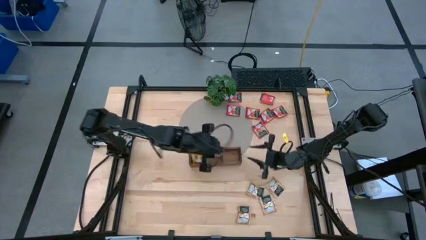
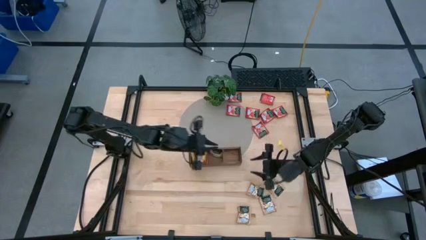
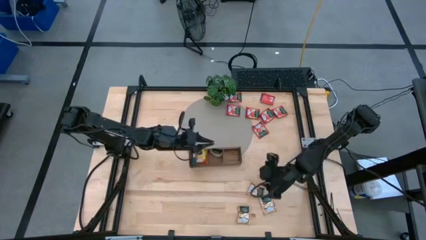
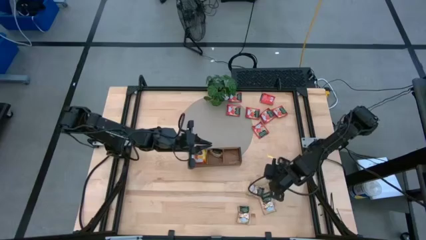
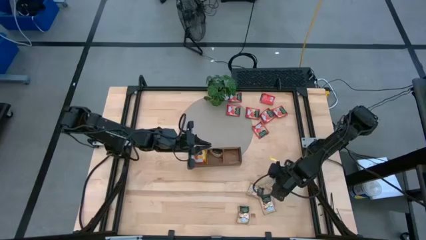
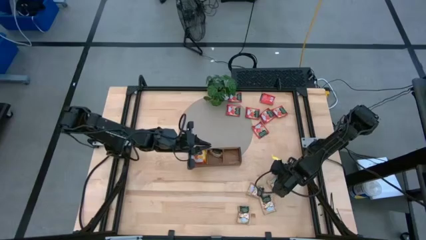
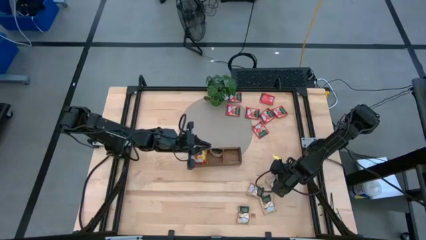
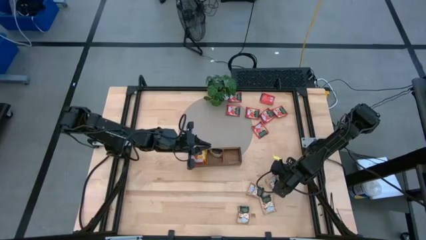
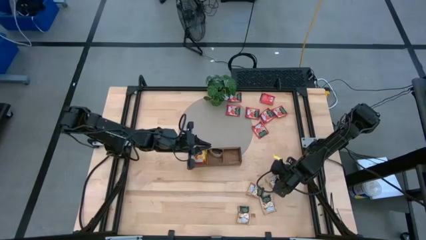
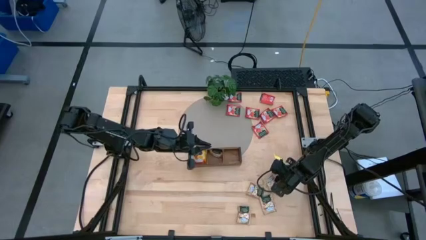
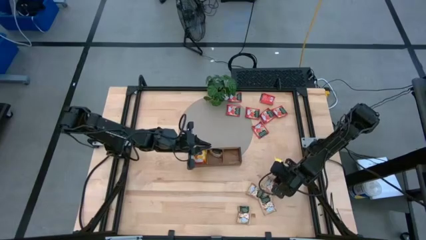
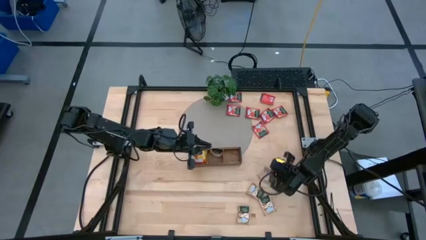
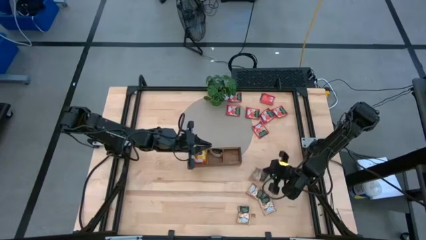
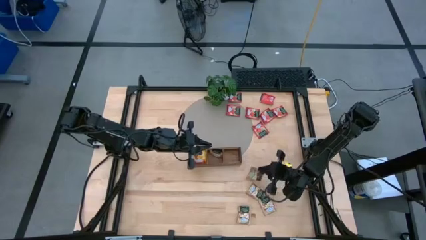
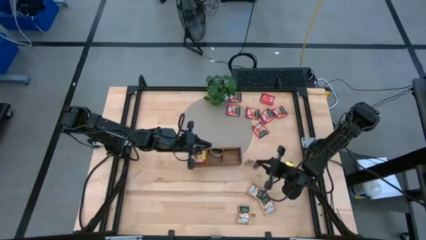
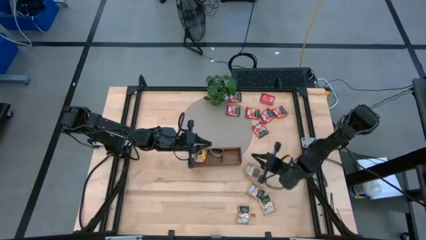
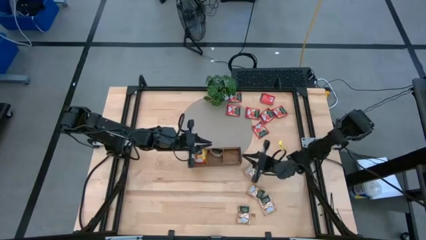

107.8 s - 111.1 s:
Task: Pick & Place Tea
Put the brown tea bag into the middle slot of the wooden organizer

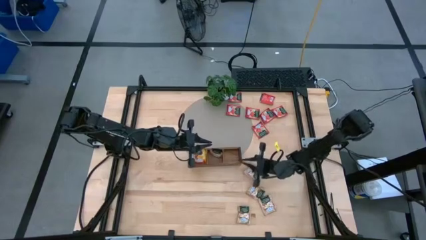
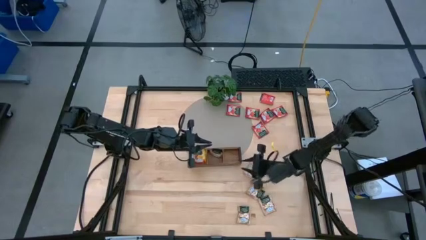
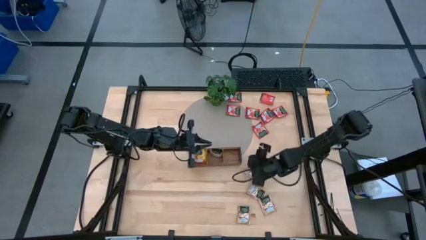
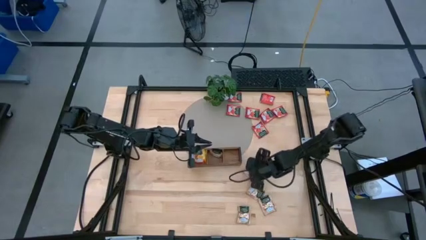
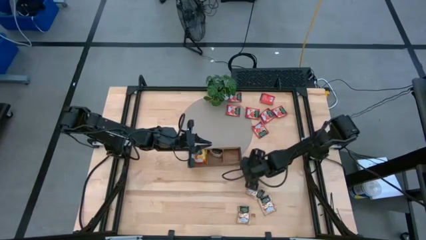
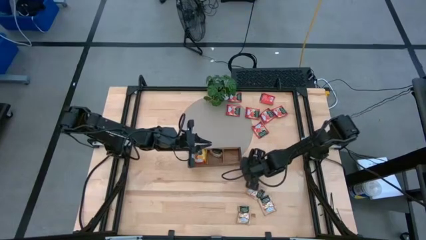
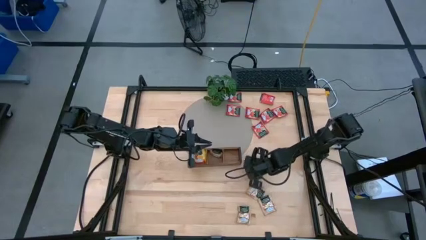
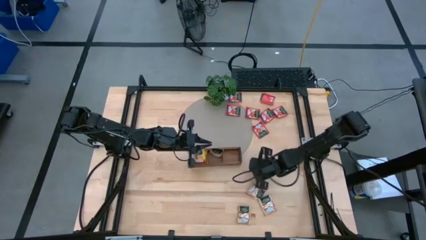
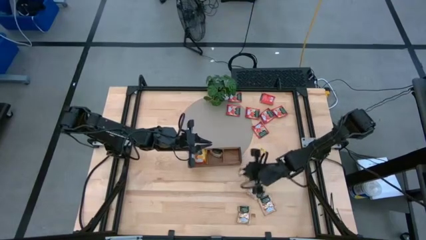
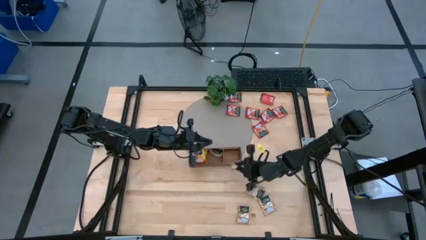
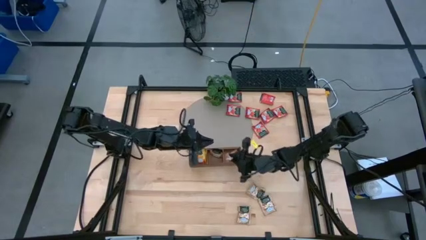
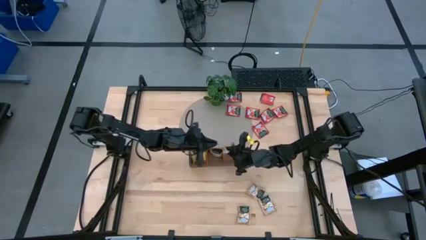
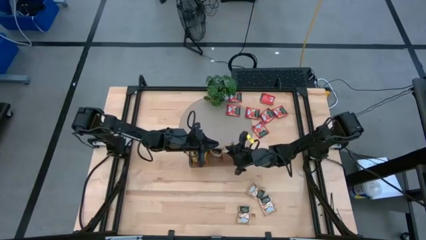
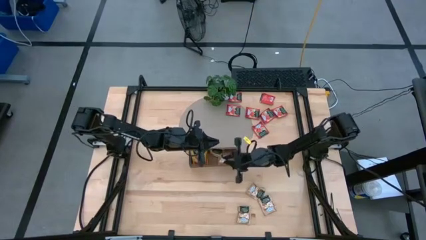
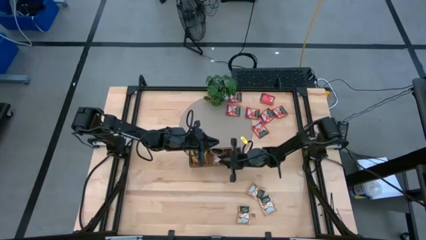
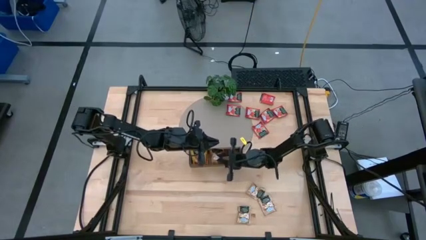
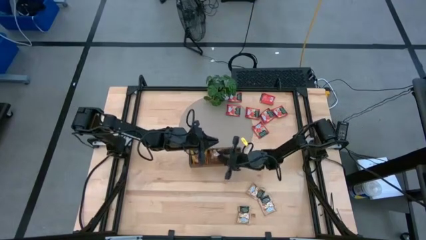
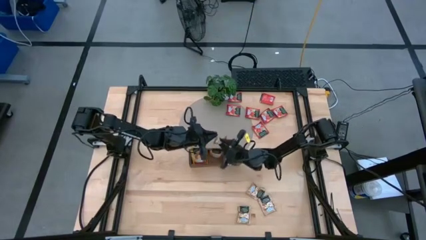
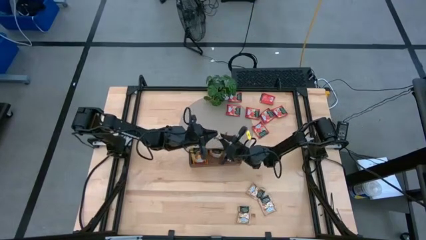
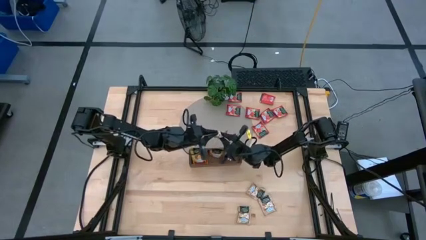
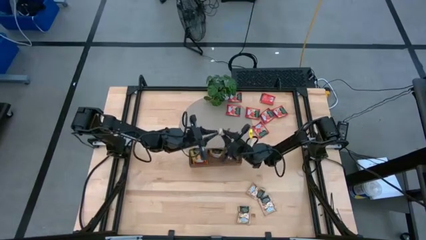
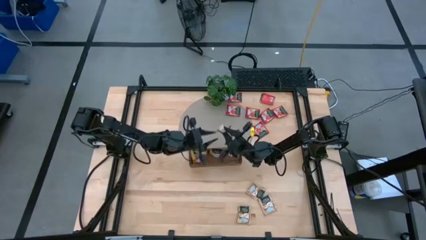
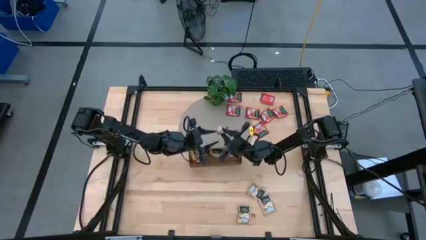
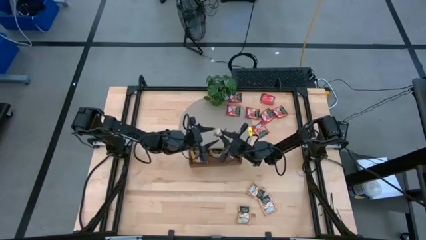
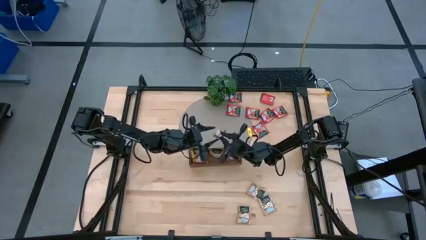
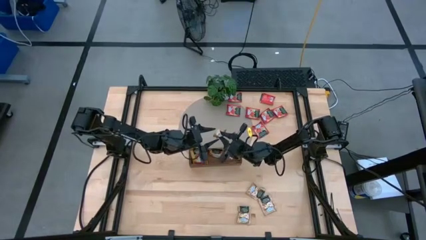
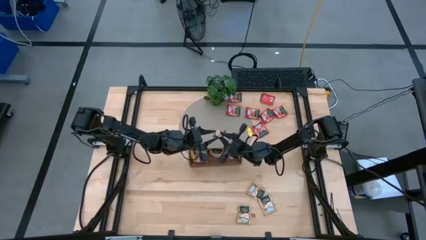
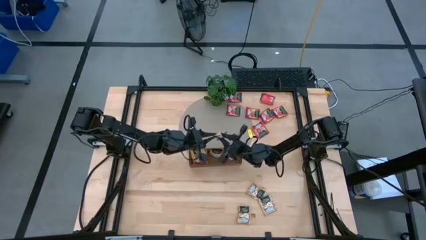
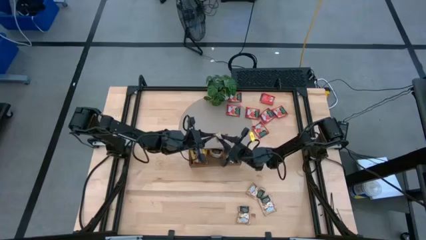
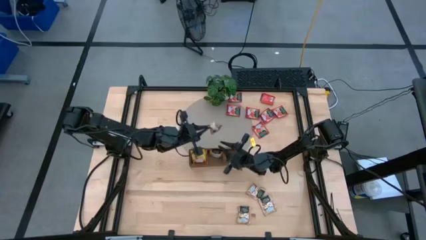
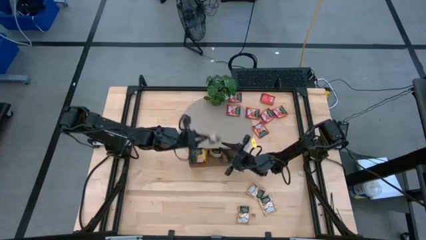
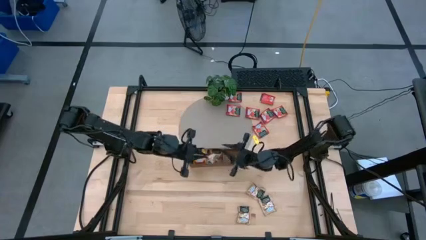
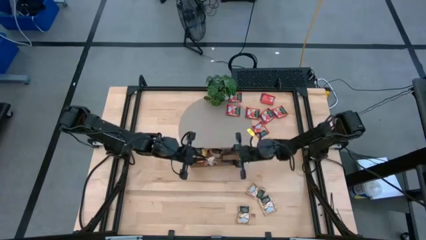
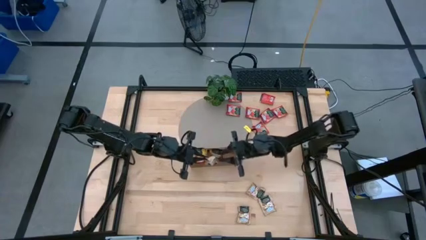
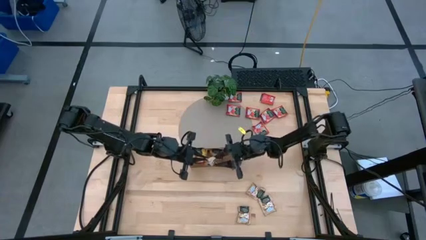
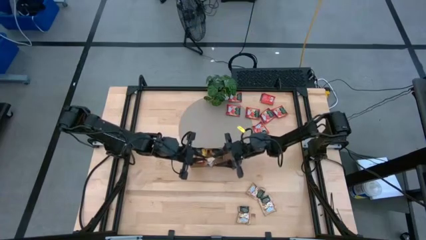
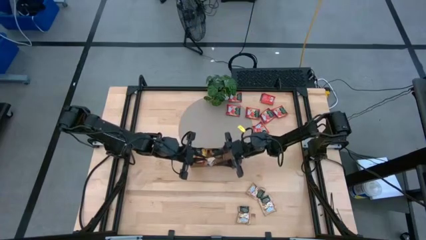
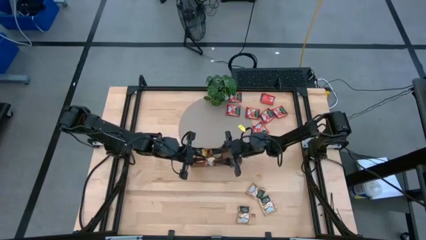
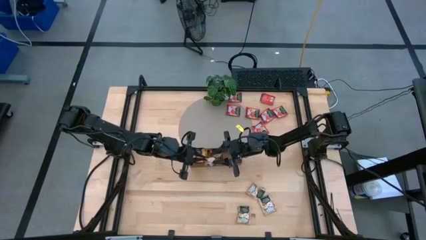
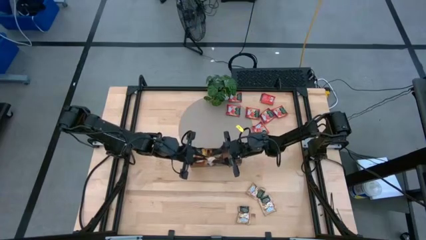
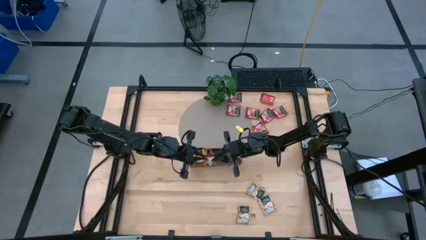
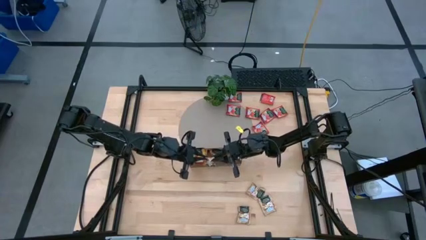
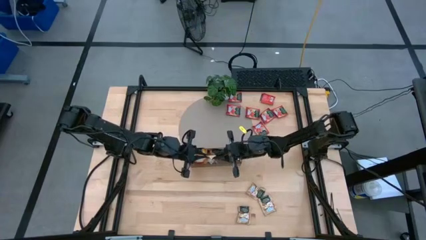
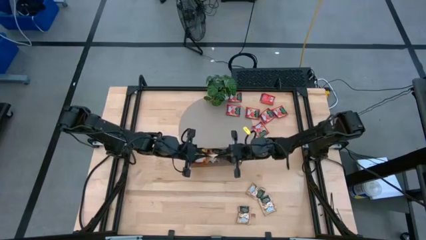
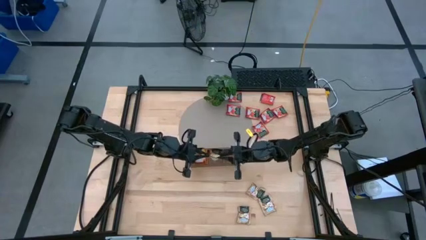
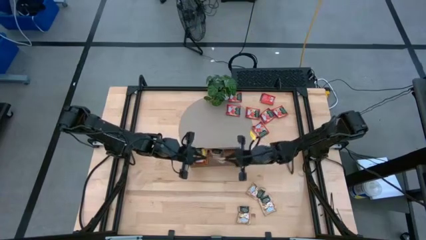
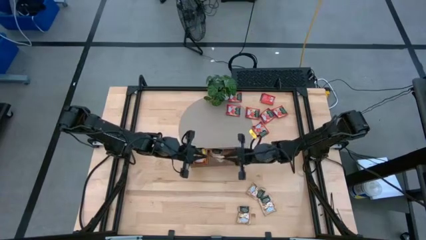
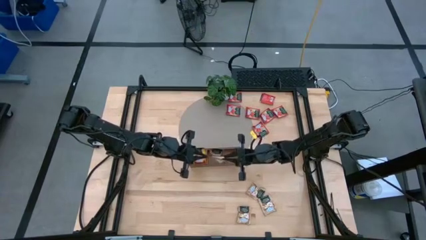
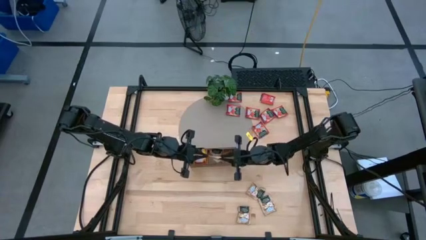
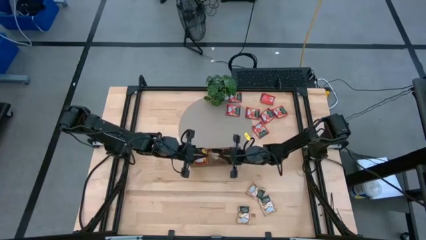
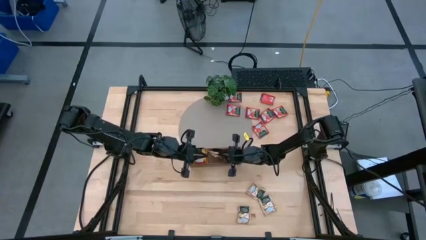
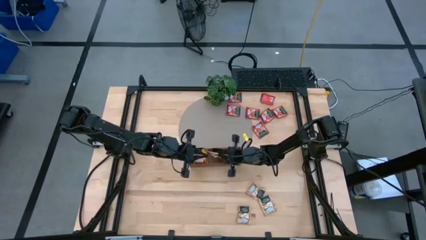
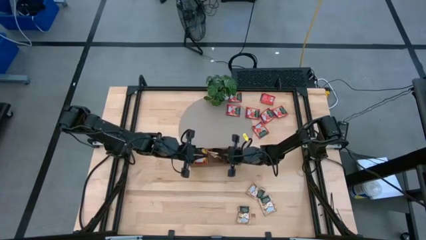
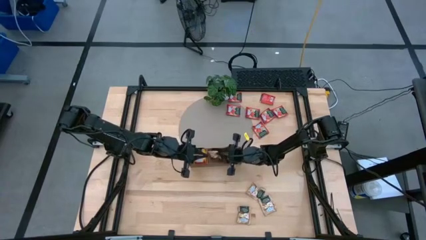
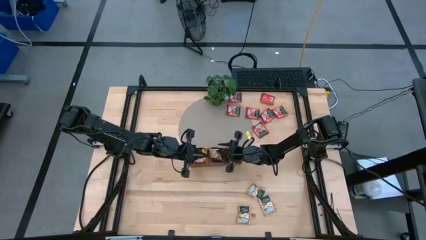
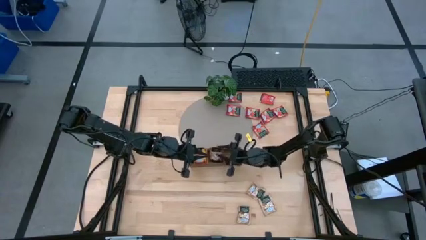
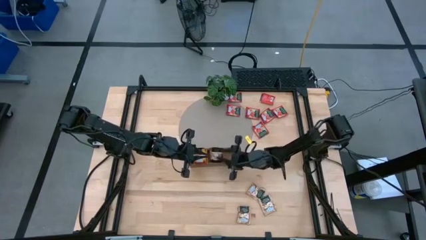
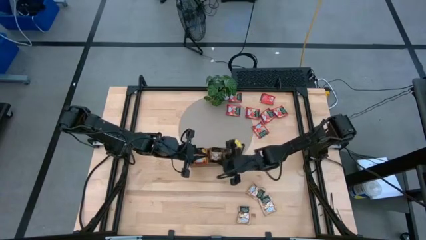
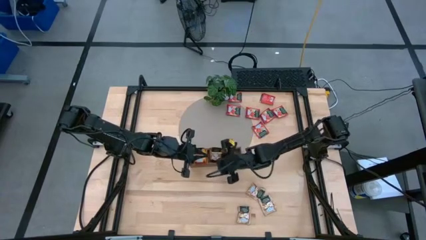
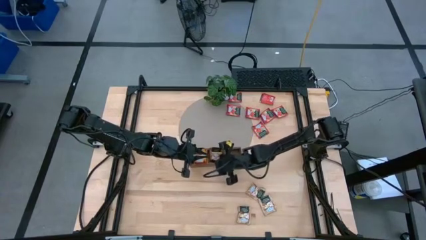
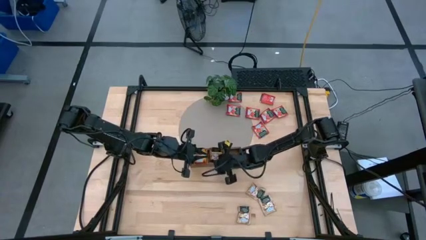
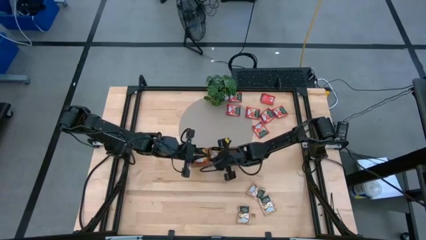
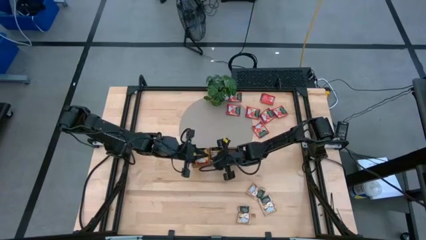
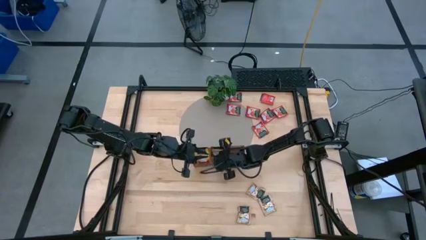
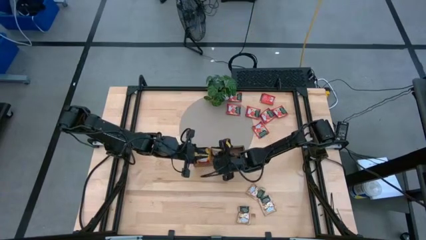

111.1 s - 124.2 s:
Put the brown tea bag into the middle slot of the wooden organizer
